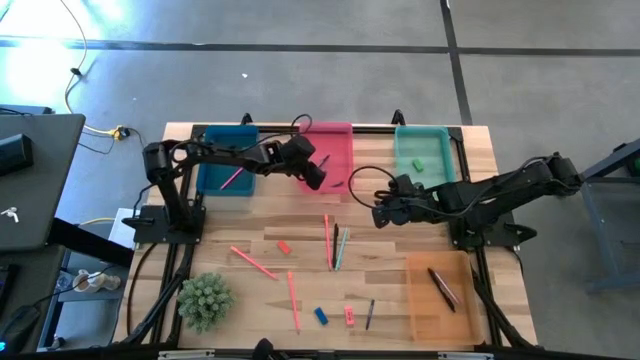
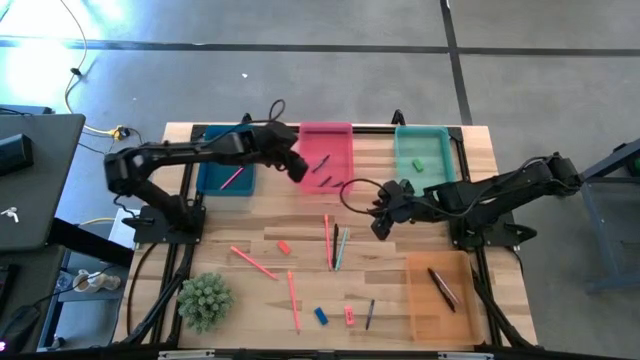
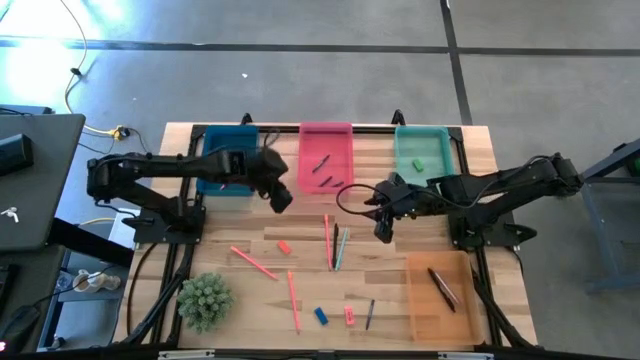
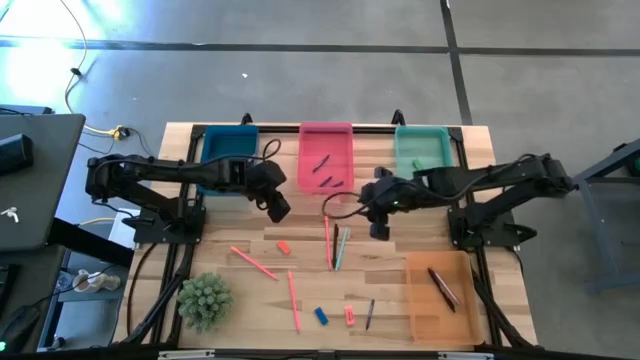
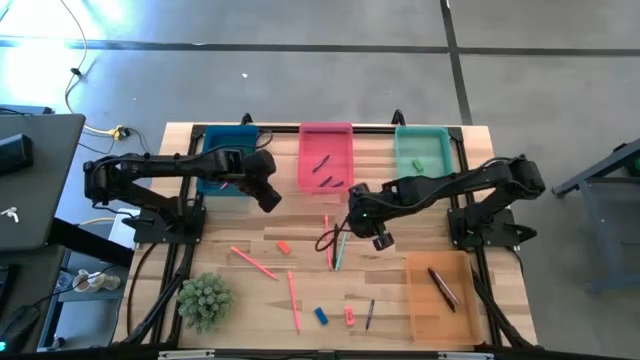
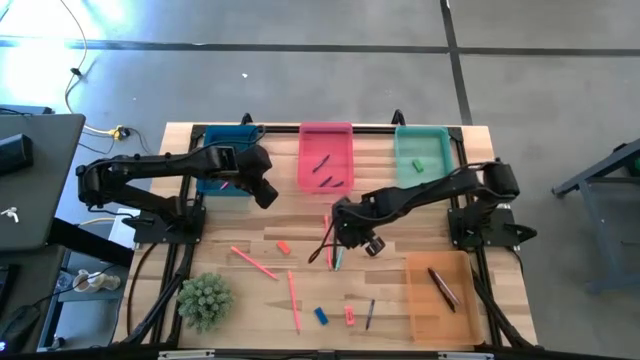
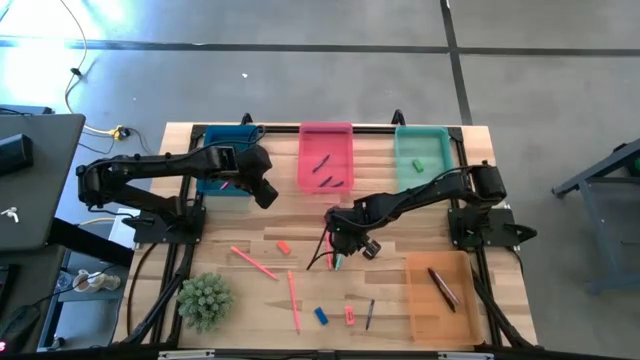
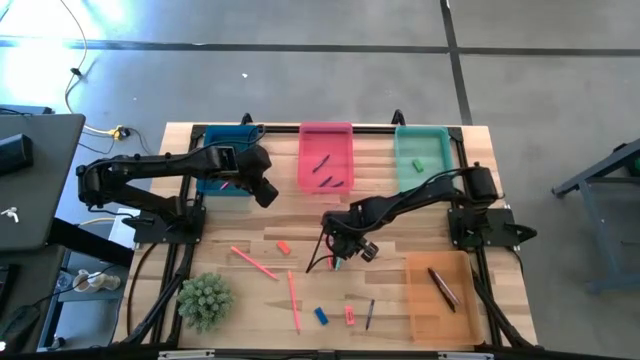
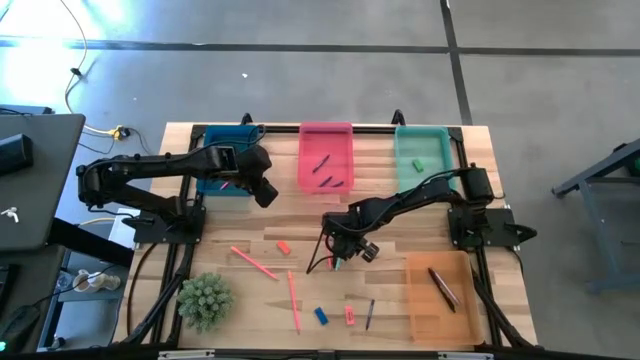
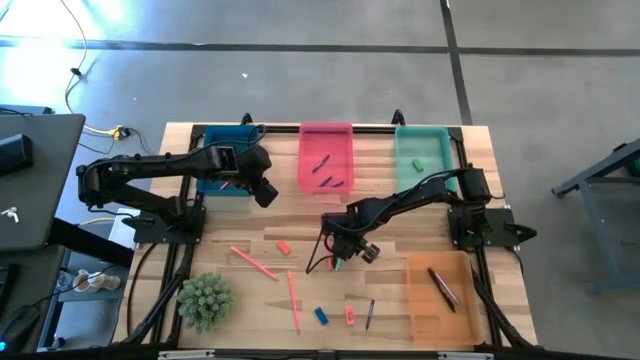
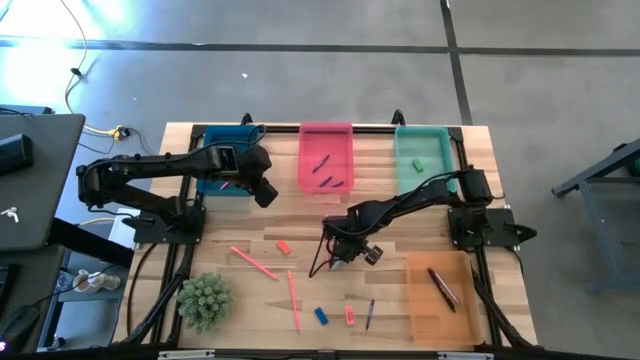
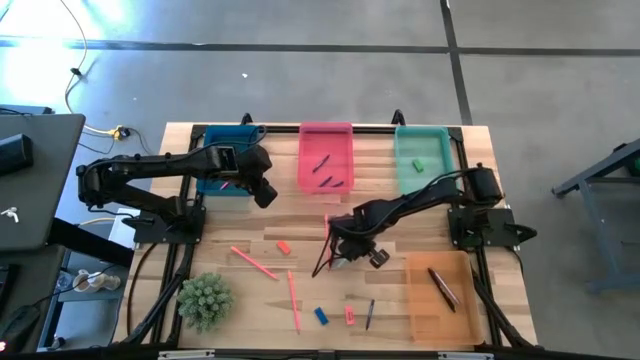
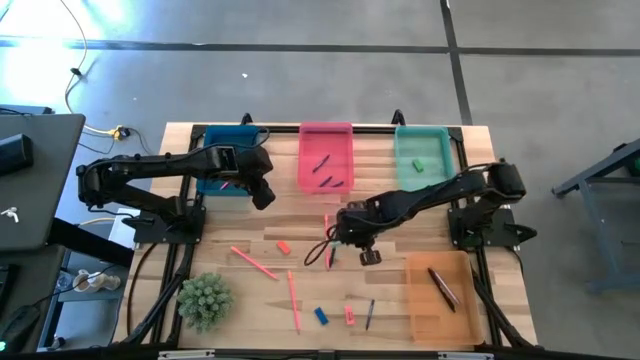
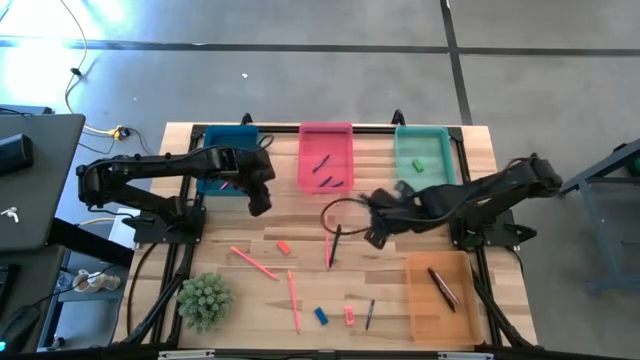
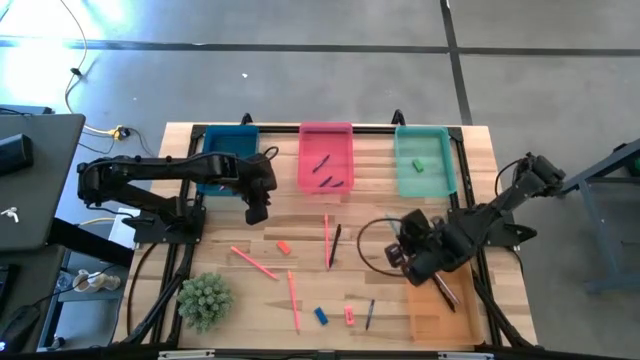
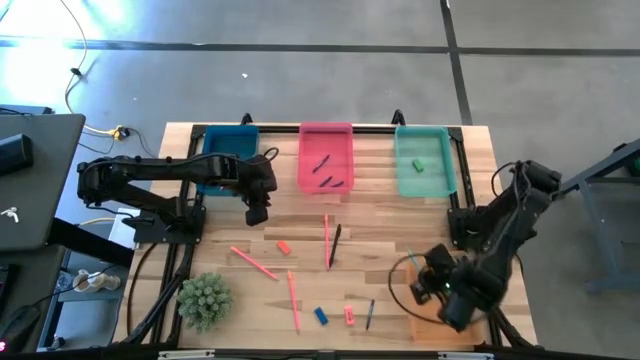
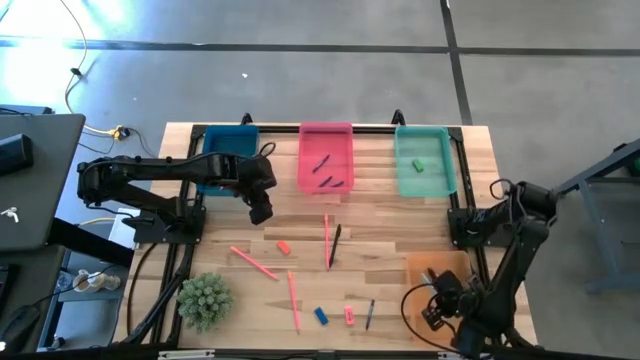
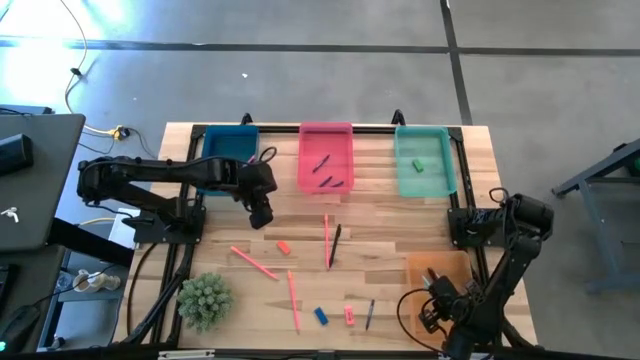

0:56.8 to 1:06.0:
Task: Sort crayons/erasers/pens/pencils in bins
Put the light blue pen into the orange bin

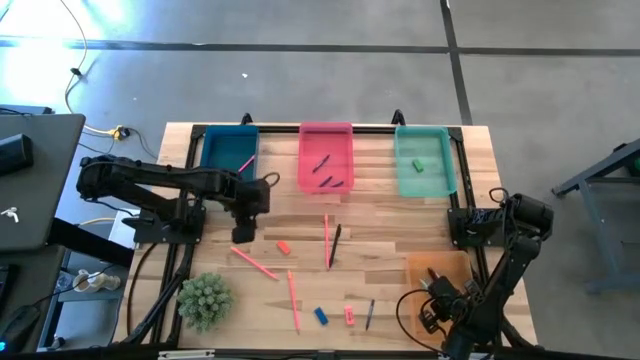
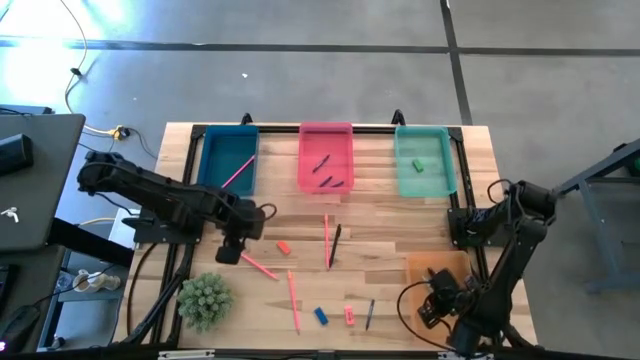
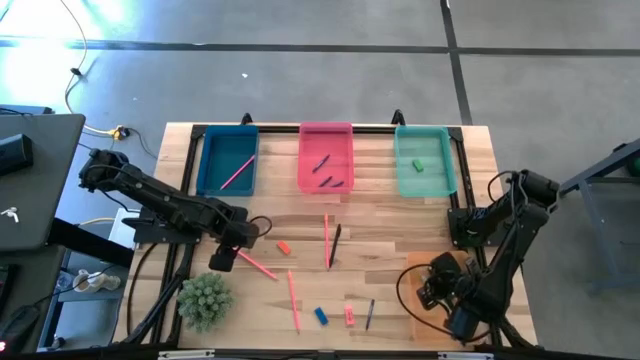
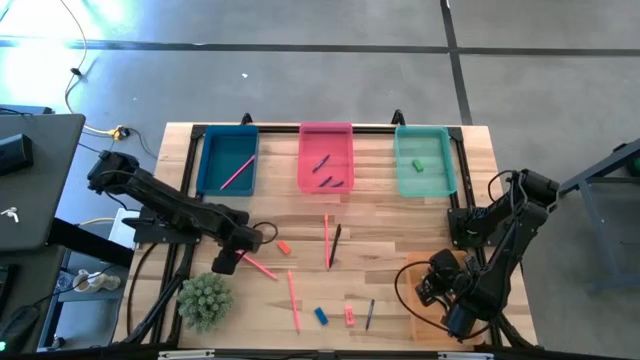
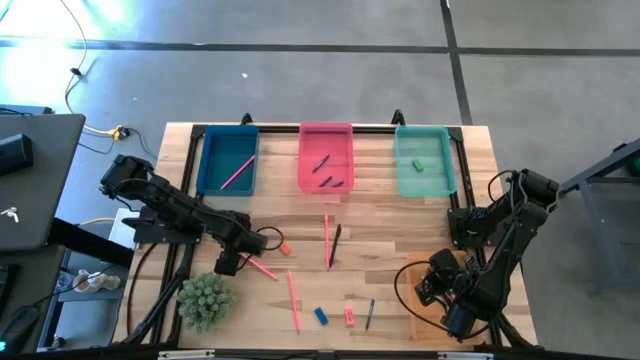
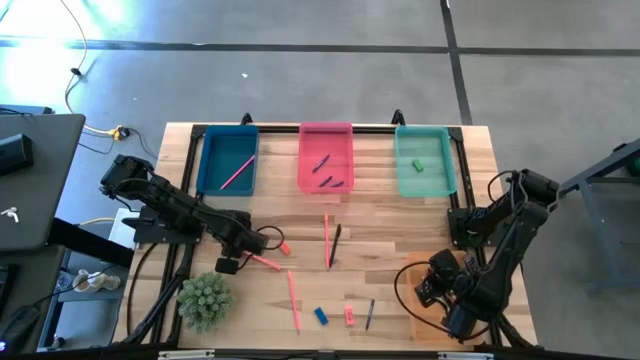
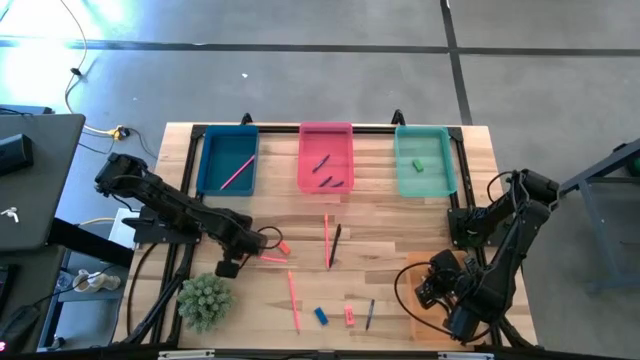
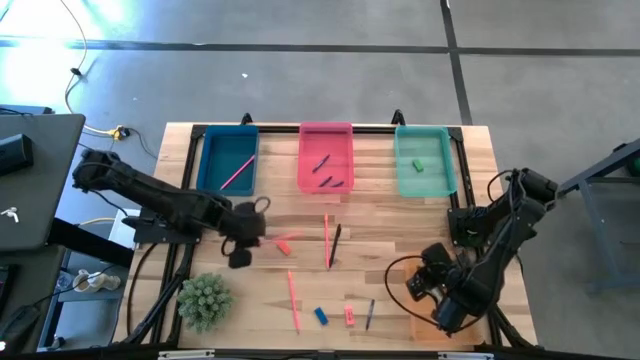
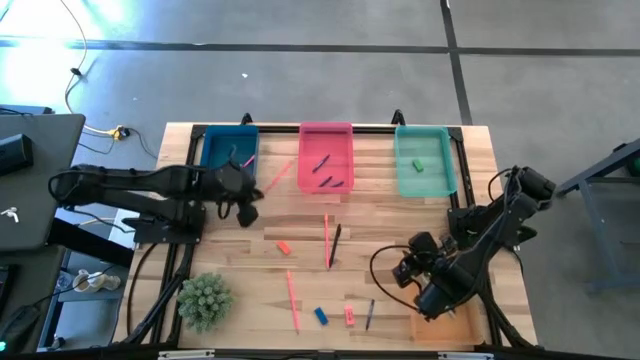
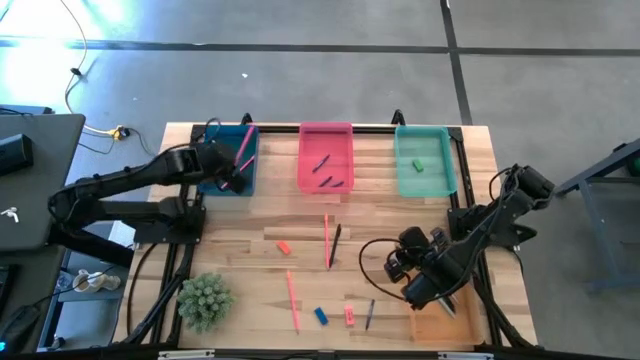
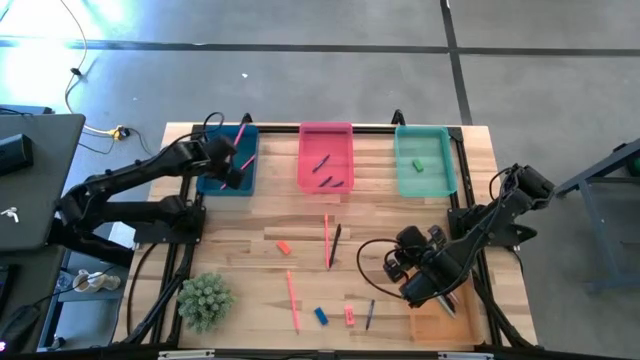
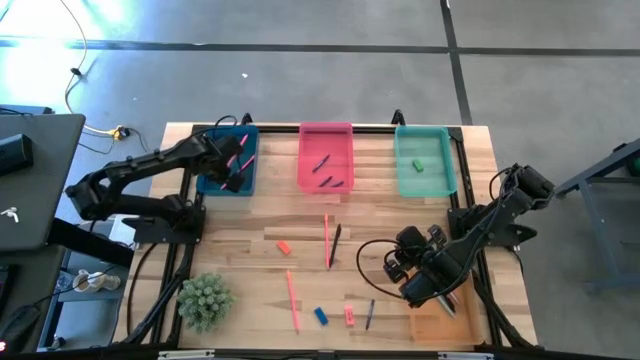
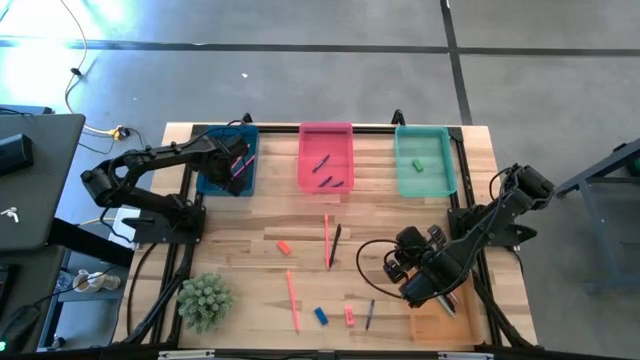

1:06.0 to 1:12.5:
Put the pink pencil into the blue bin

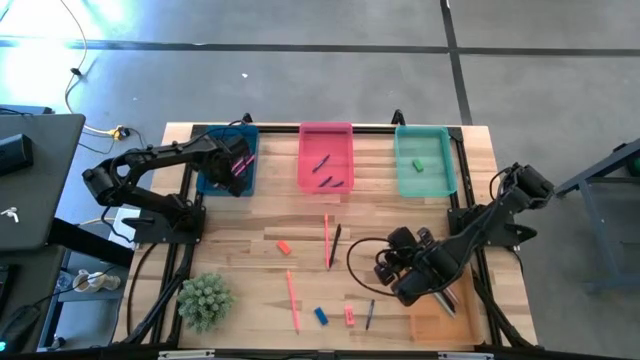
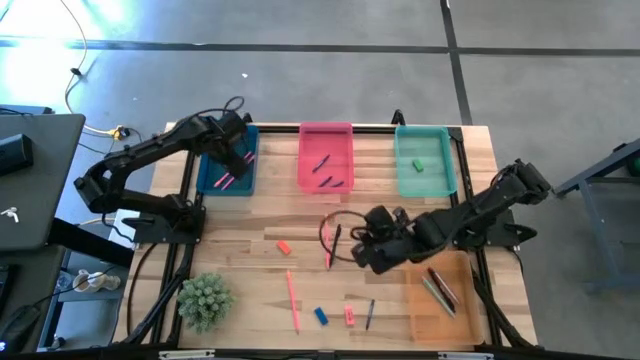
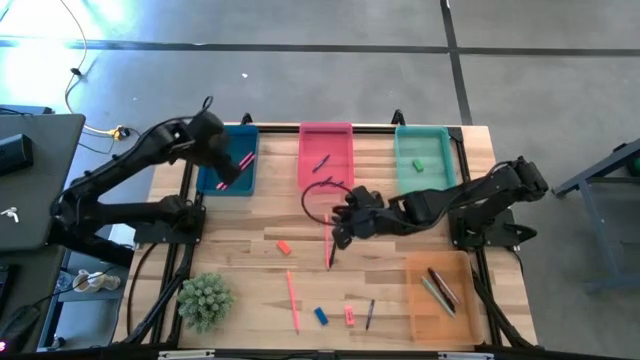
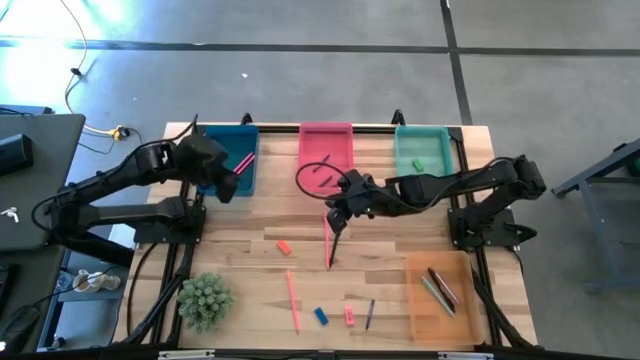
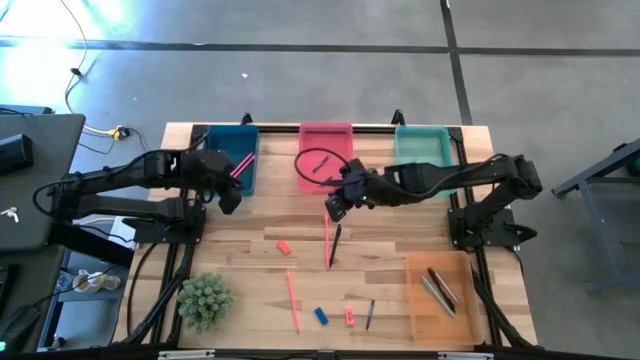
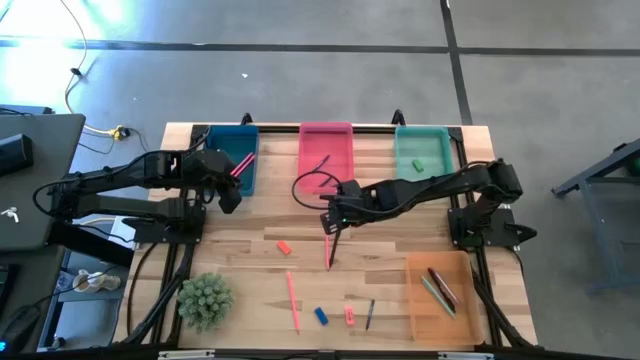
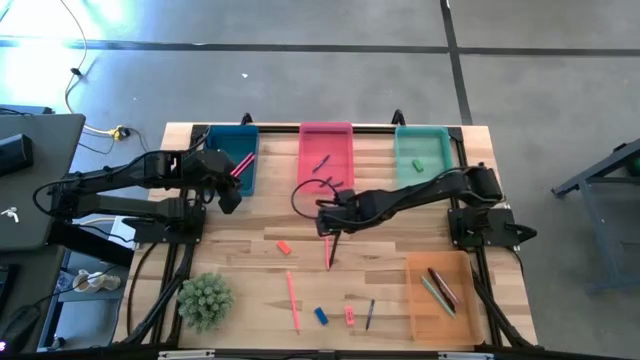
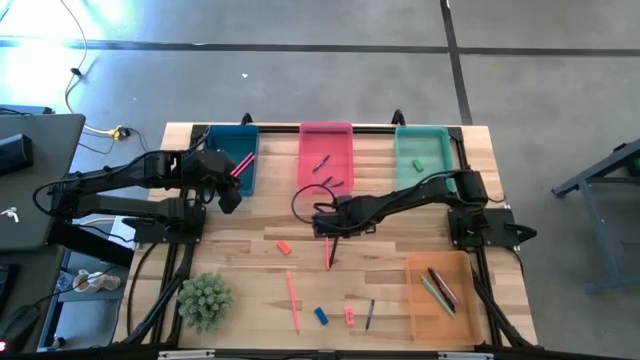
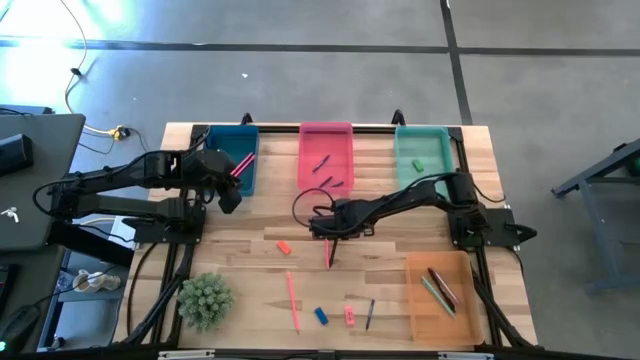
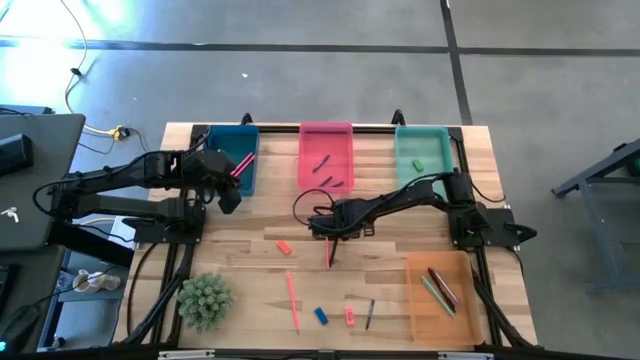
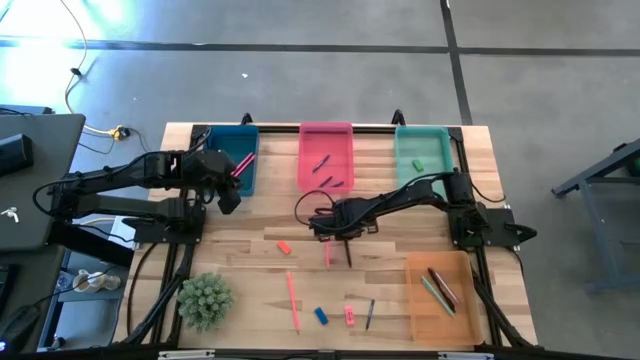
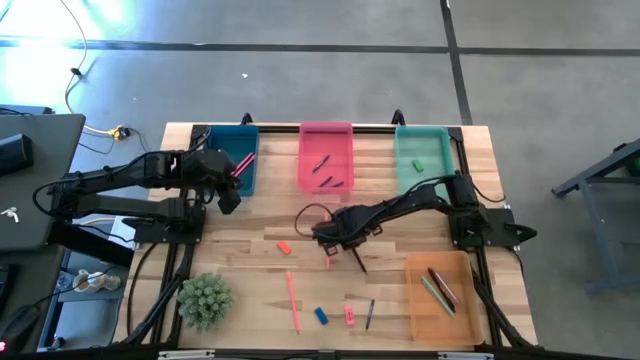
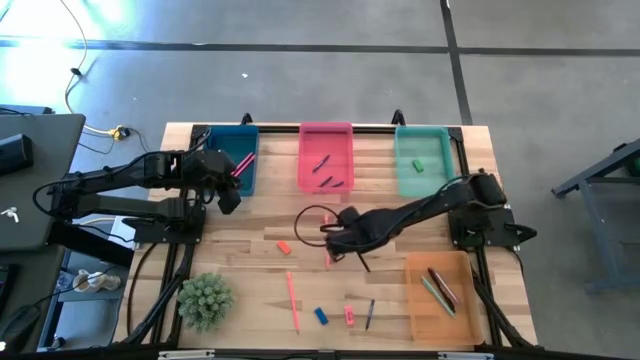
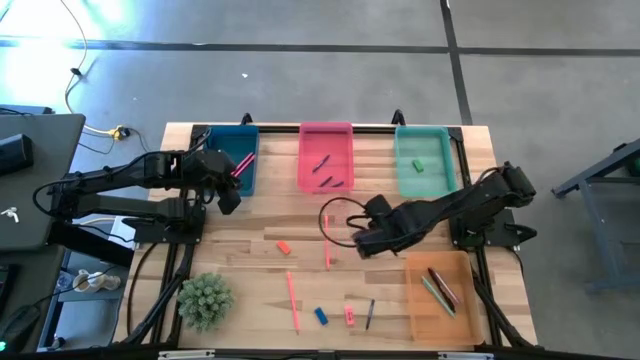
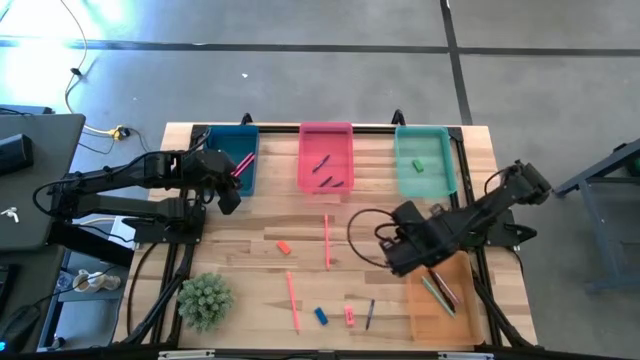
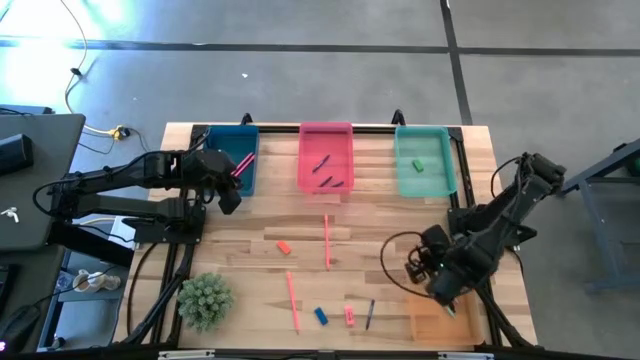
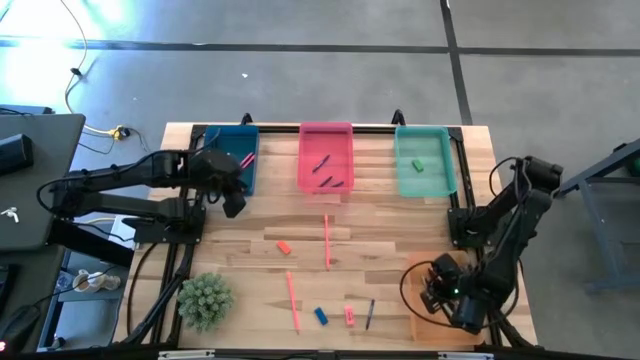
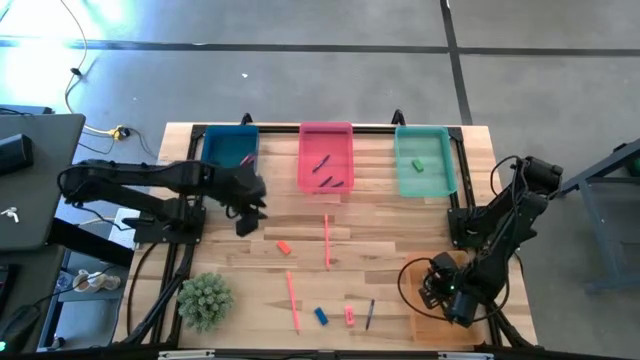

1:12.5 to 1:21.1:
Put the black pen into the orange bin
